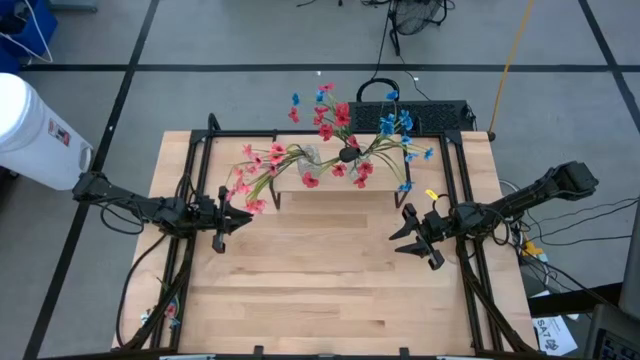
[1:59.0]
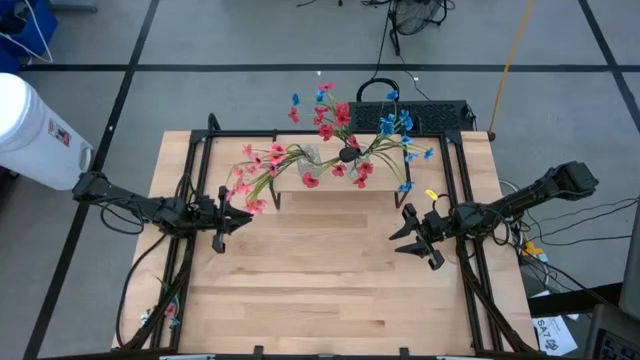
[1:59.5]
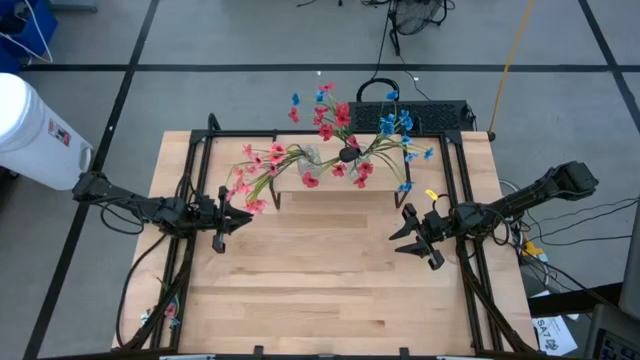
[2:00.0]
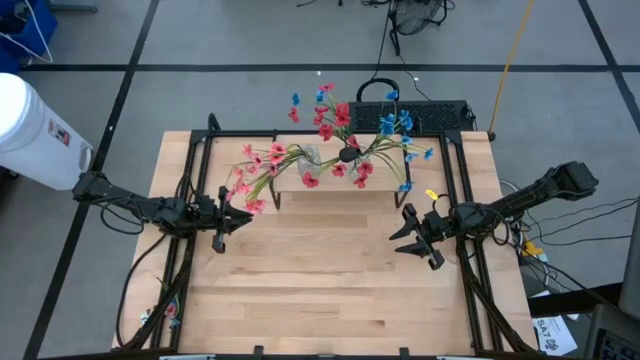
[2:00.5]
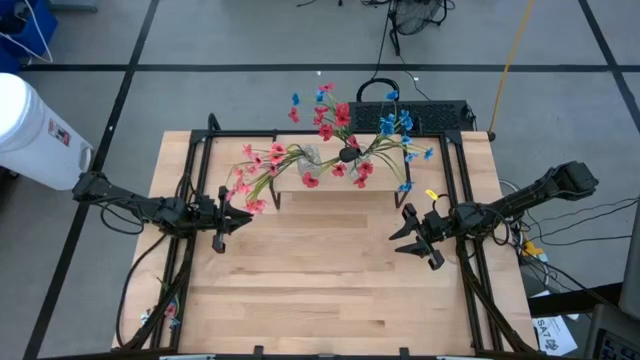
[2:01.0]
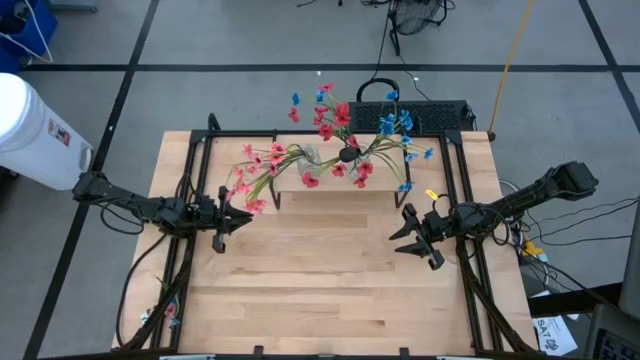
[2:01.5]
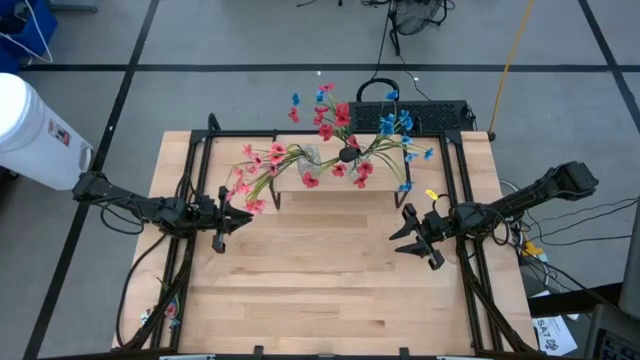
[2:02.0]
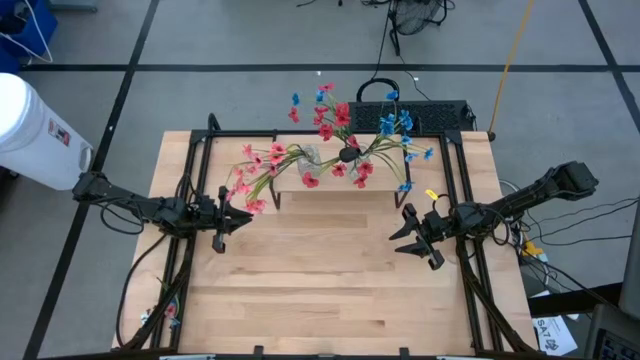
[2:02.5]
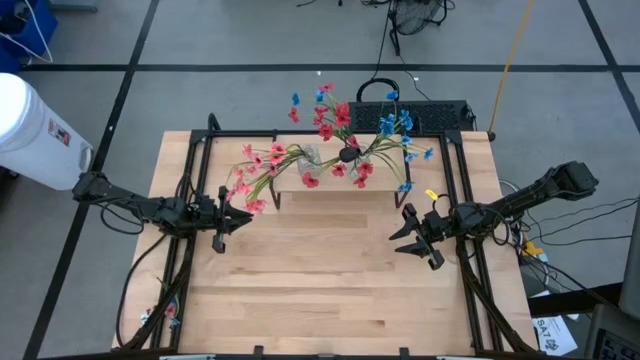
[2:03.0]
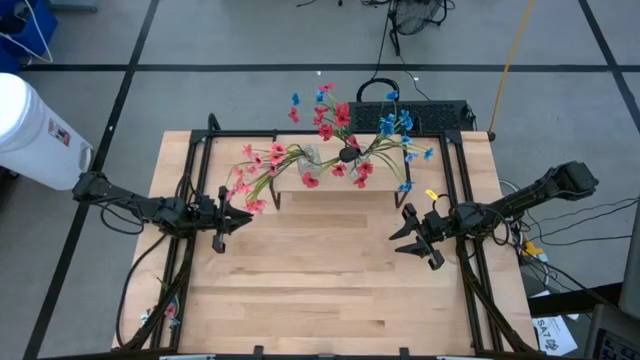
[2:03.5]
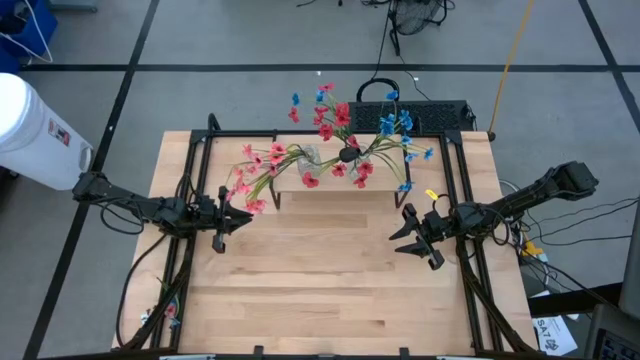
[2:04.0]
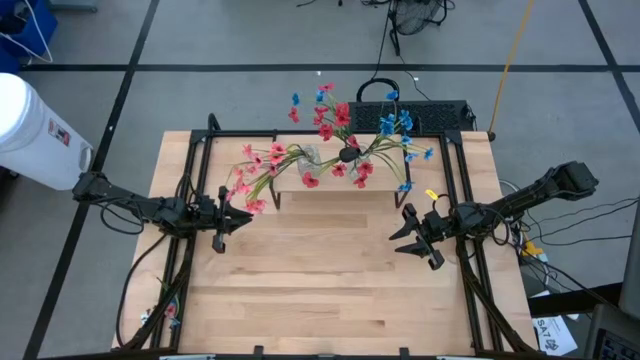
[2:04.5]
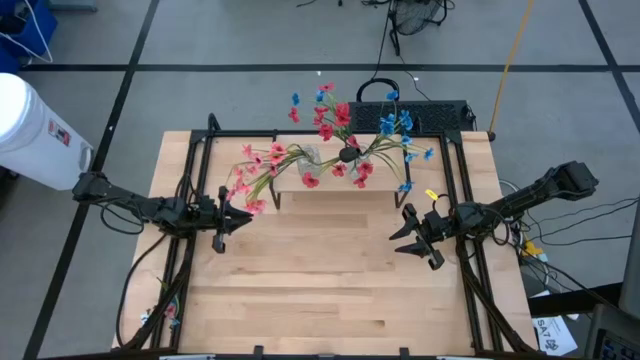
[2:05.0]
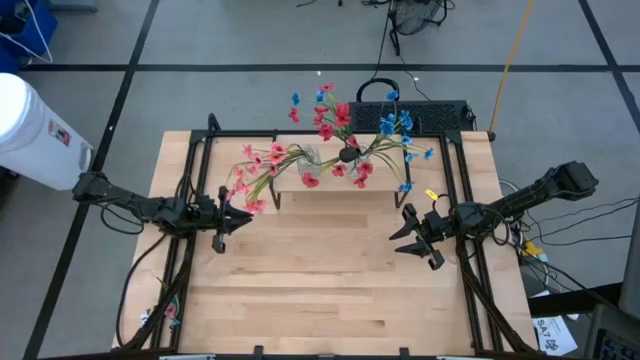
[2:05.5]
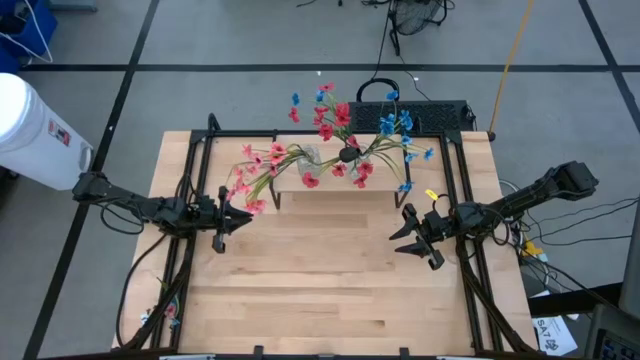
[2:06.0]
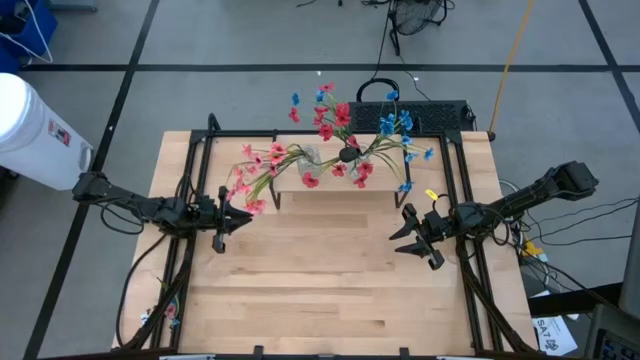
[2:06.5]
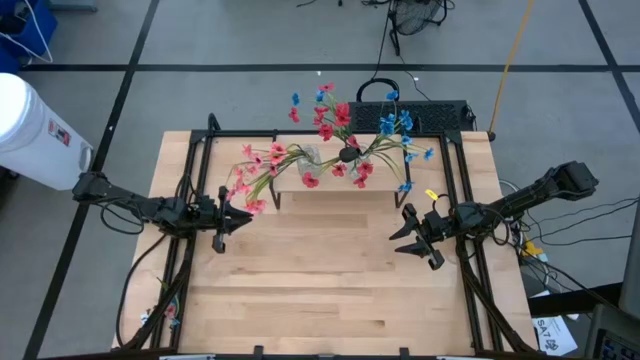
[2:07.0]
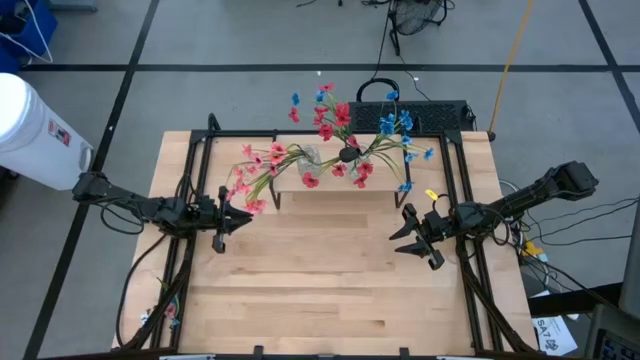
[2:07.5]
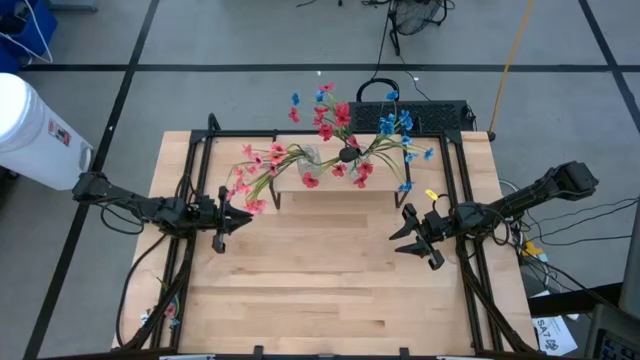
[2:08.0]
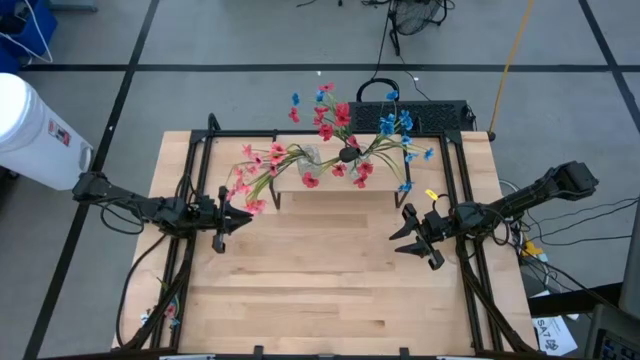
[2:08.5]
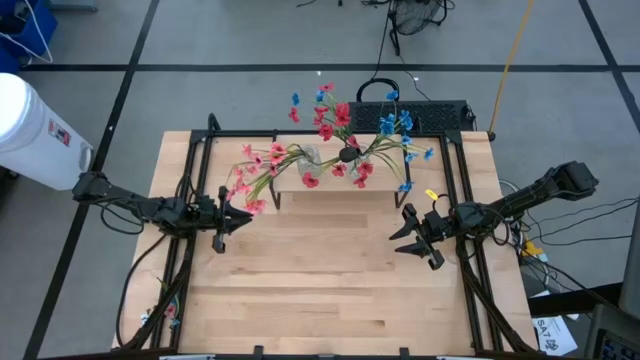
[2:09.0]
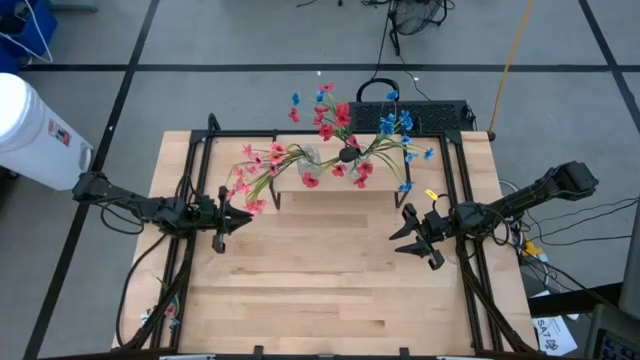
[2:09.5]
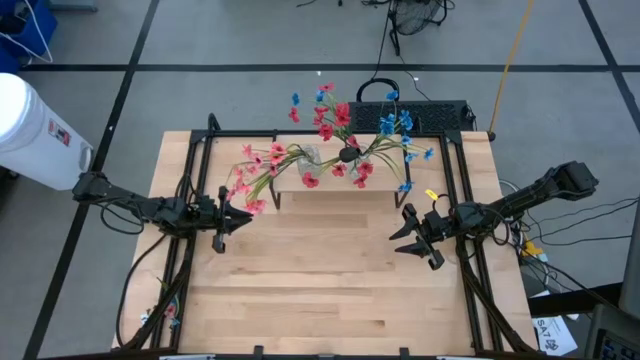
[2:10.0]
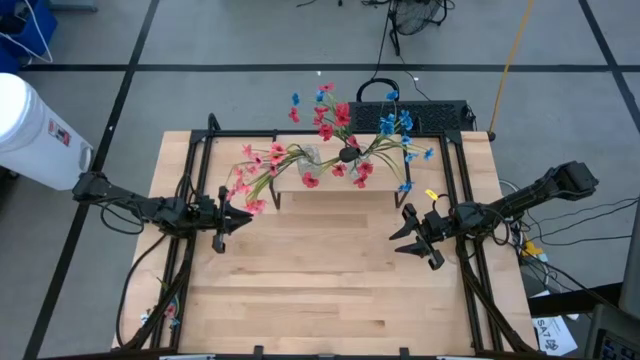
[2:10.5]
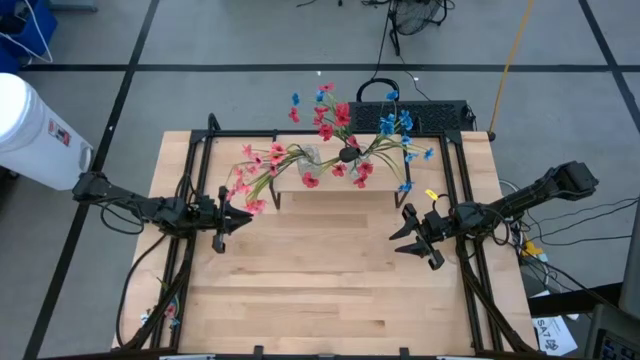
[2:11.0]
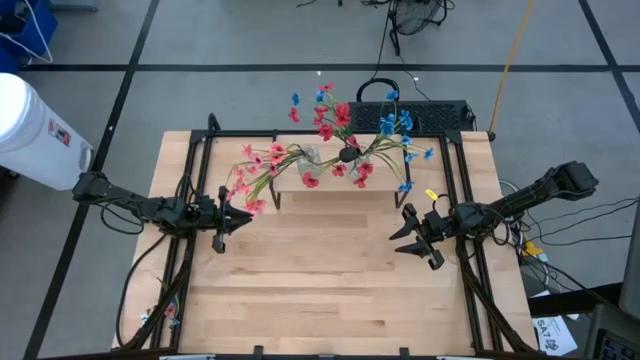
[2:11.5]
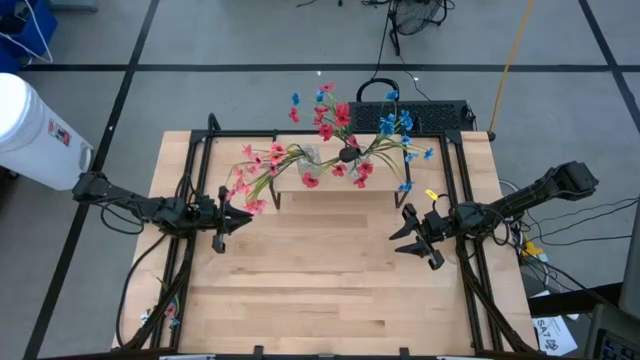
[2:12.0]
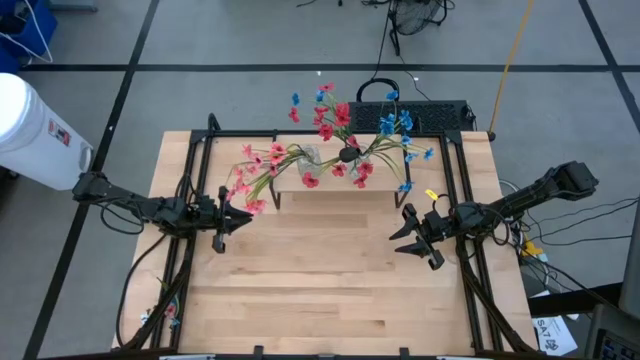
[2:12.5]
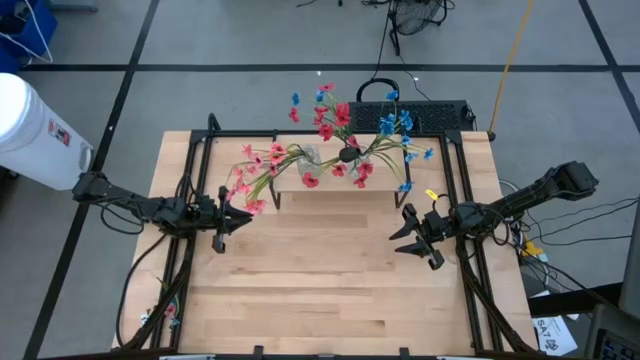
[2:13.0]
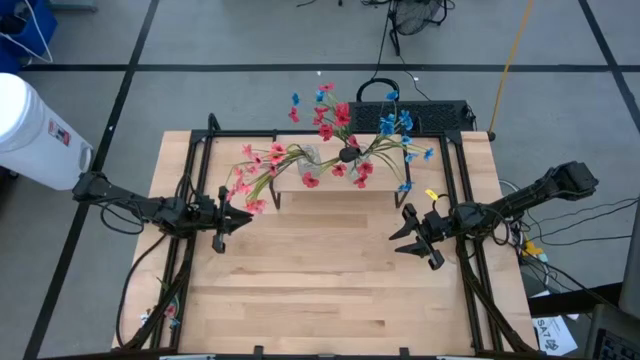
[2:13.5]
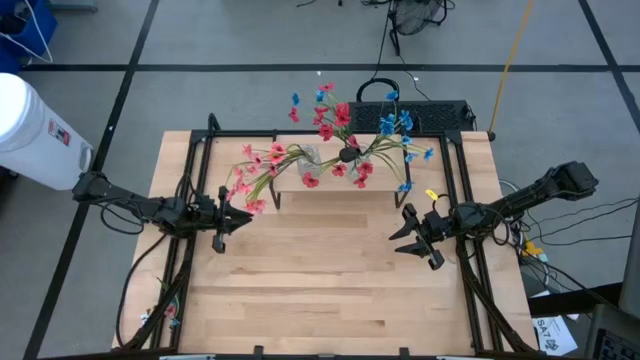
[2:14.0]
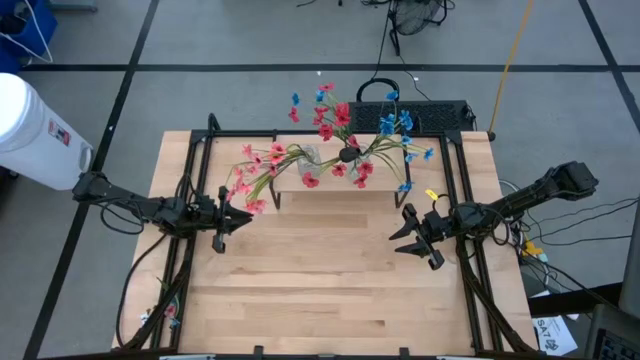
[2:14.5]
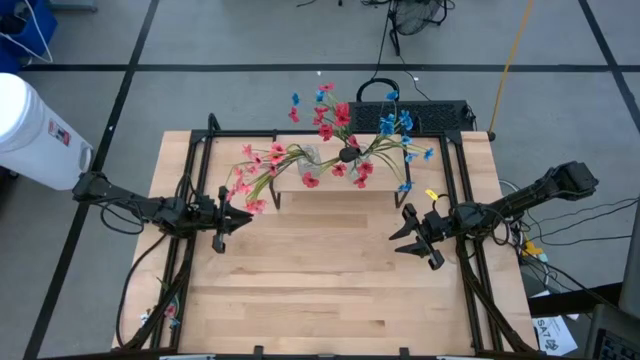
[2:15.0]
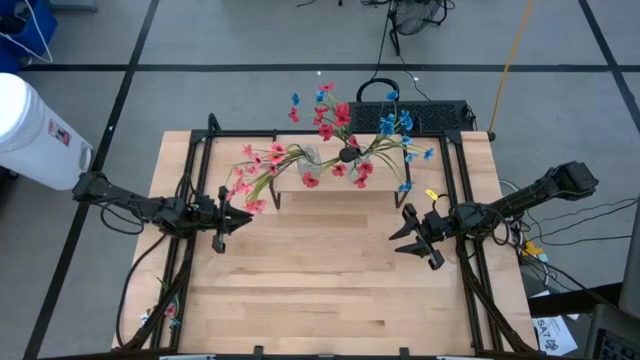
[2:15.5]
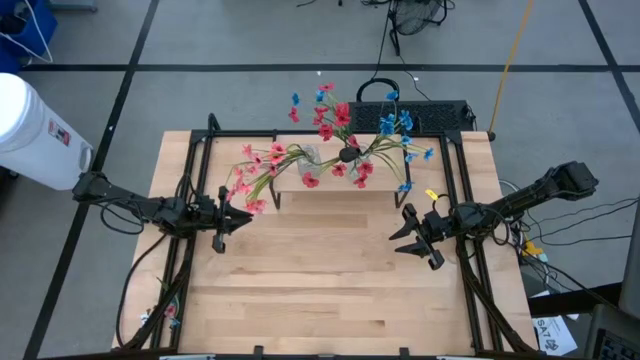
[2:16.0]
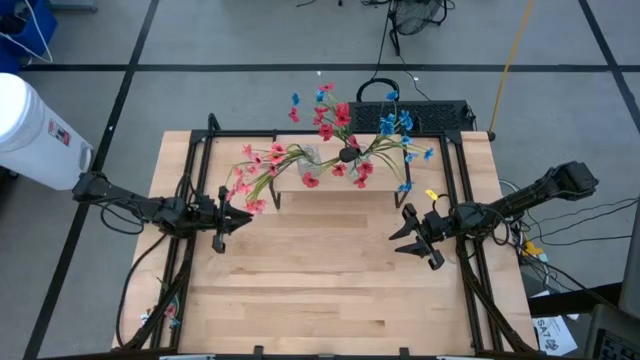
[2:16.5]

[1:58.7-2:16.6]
Task: Pick and place flowers into a vace then onto a shelf
Return to Home Position

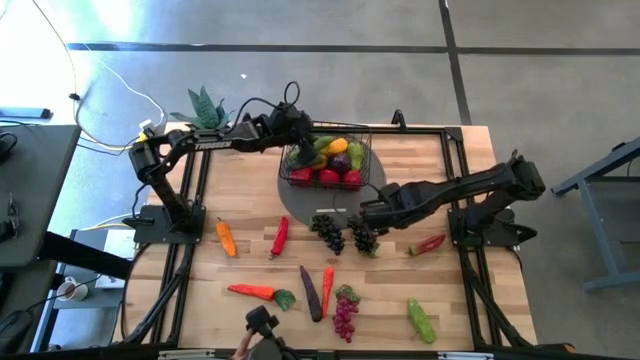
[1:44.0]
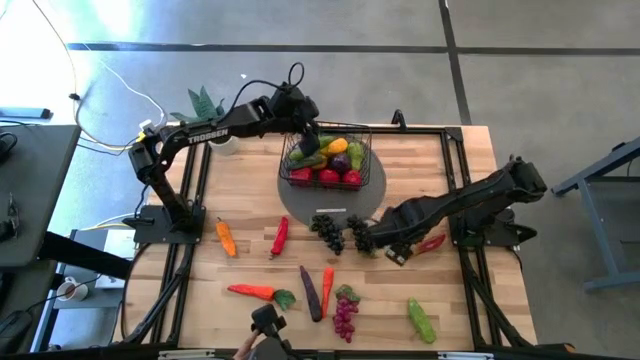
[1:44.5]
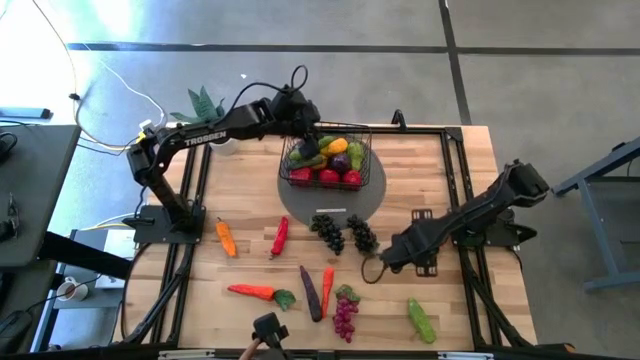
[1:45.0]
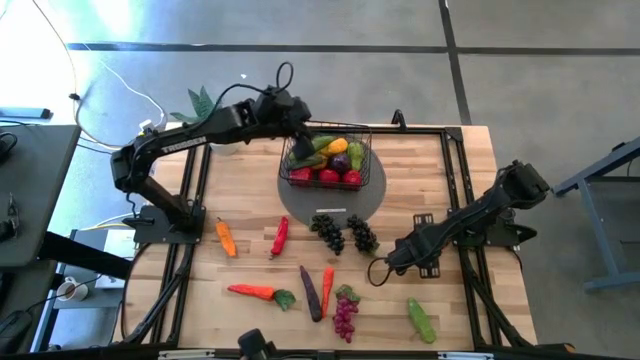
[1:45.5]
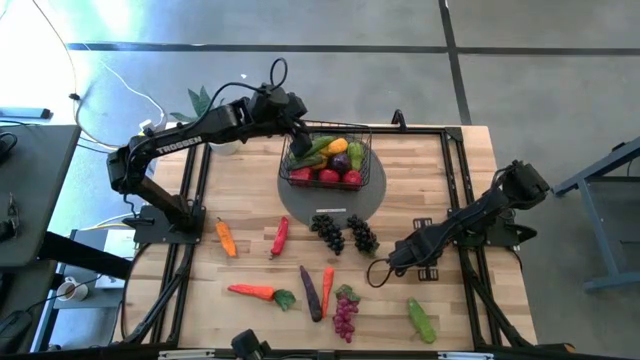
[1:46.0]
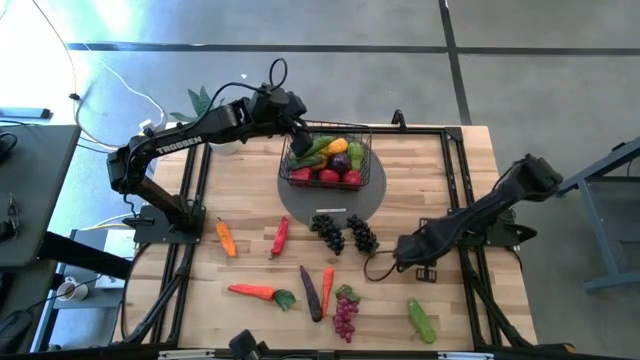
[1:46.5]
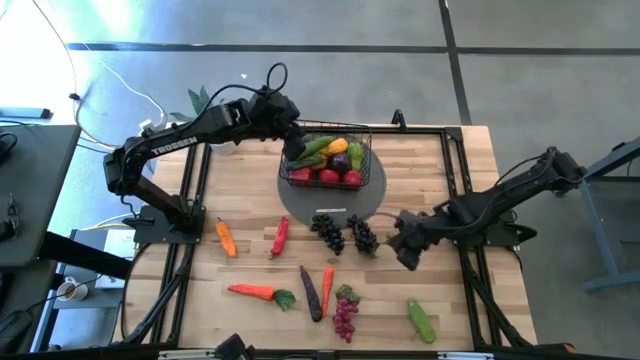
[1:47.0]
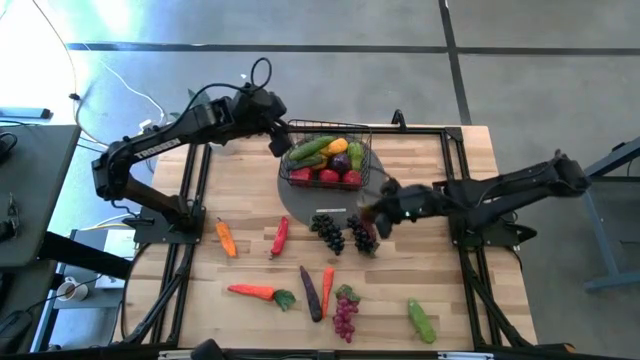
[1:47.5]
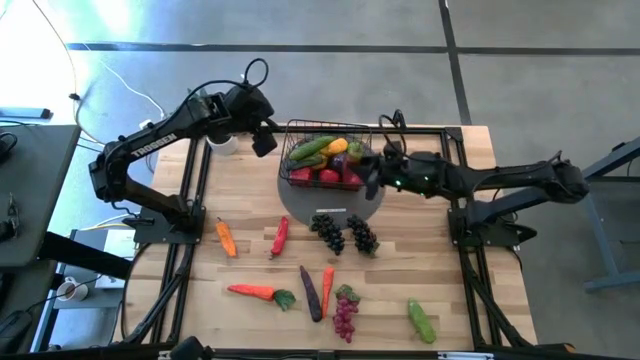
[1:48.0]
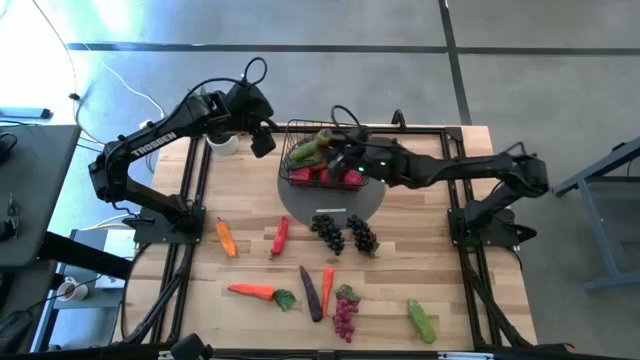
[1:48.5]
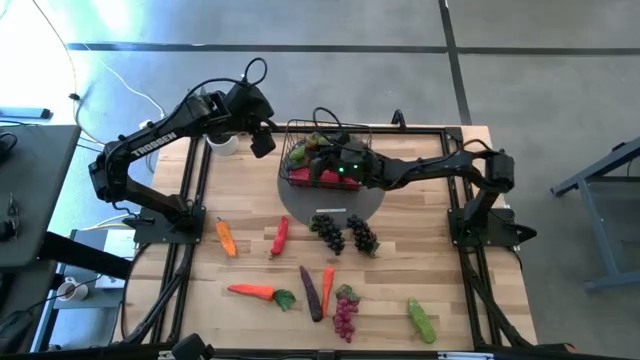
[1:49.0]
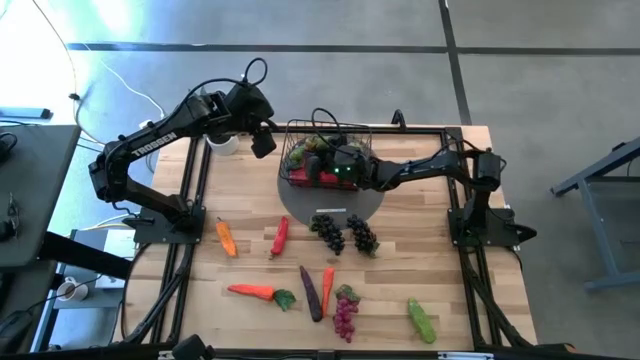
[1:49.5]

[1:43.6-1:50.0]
Task: Build produce basket
Put the green and red chilli pepper into the wire basket
